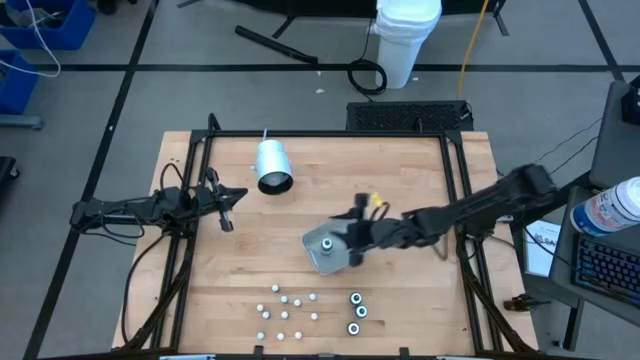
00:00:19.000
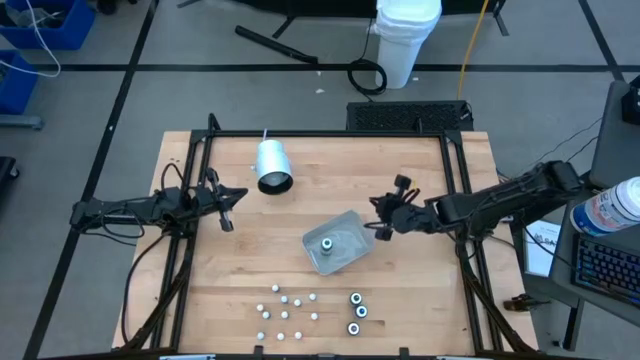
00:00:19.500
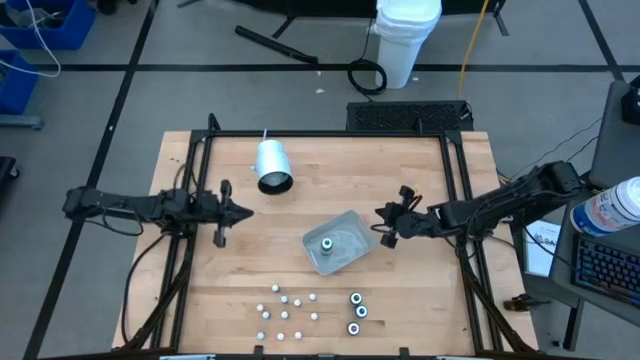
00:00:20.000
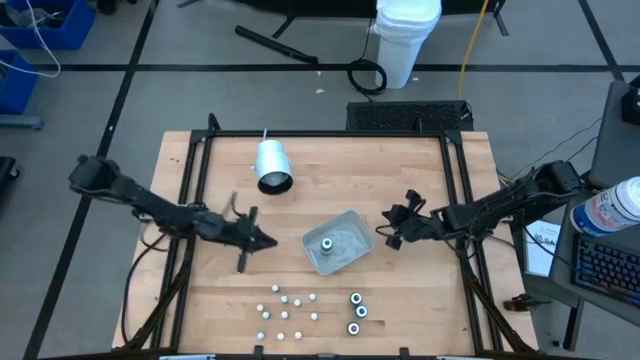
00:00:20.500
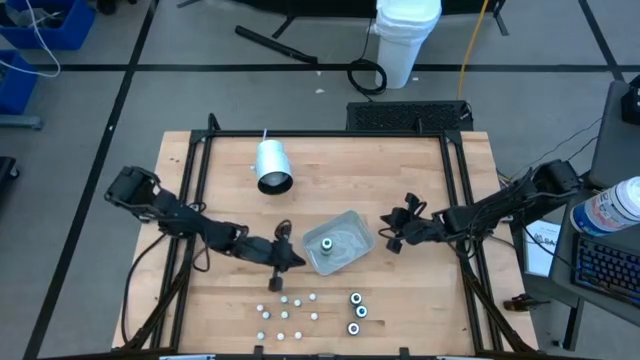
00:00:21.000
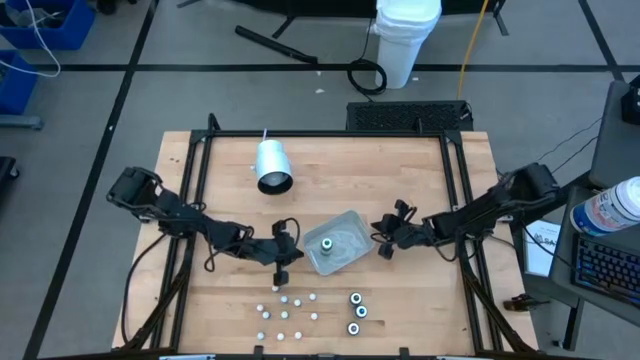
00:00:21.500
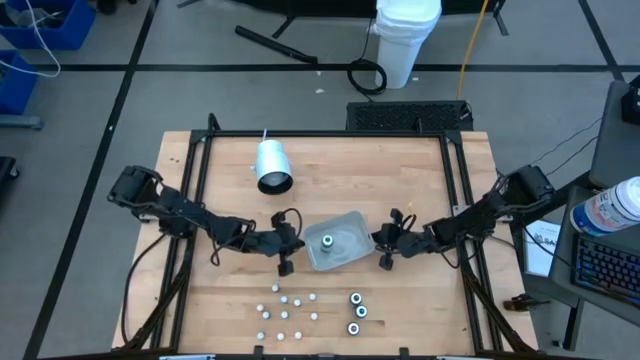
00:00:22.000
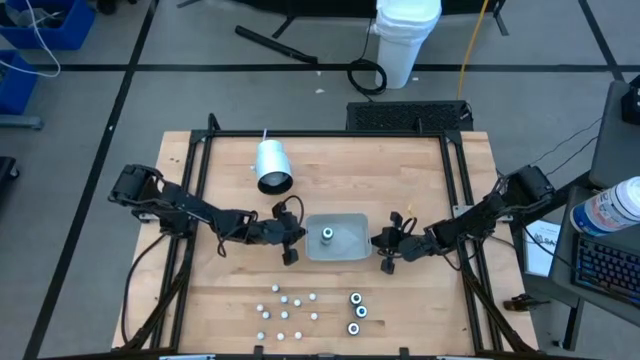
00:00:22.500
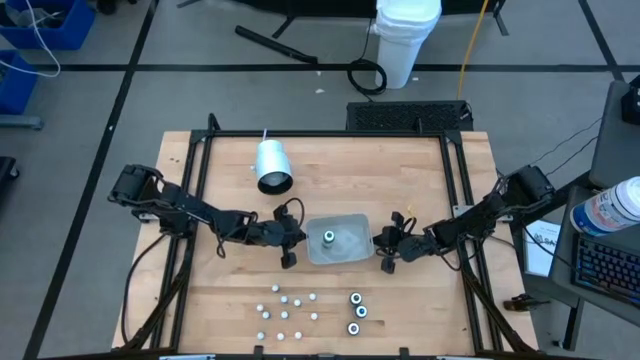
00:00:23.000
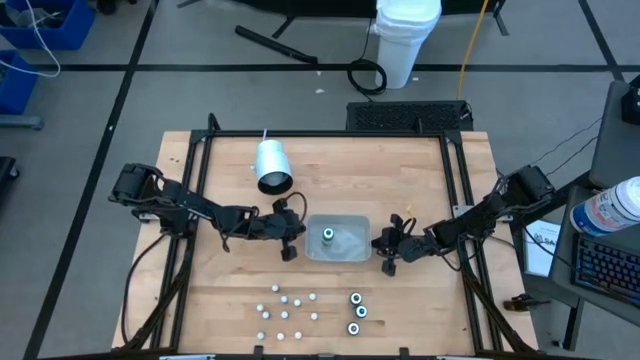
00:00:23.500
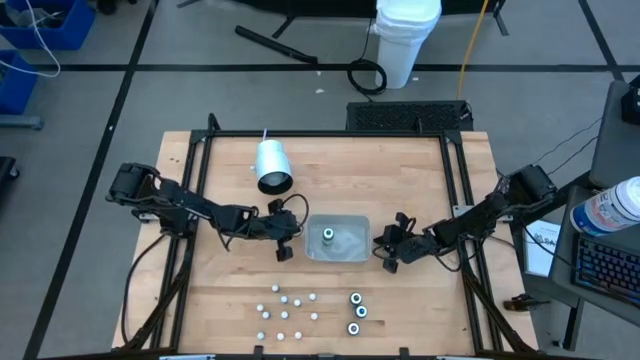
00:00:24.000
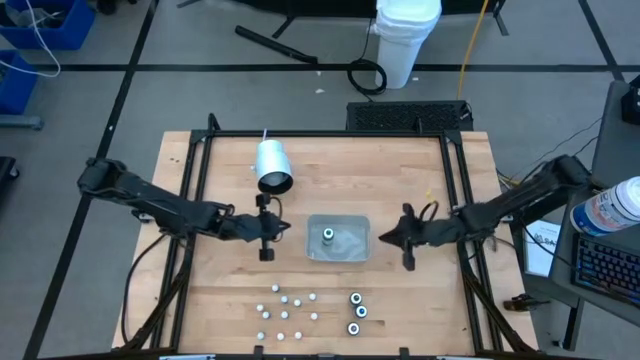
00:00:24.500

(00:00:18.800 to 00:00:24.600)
Task: Pick & Place food coloring
Adjust the white bin

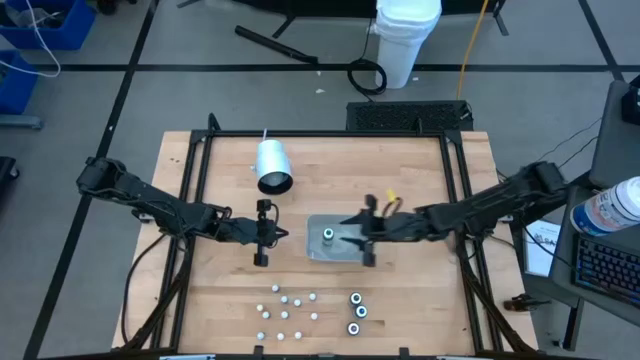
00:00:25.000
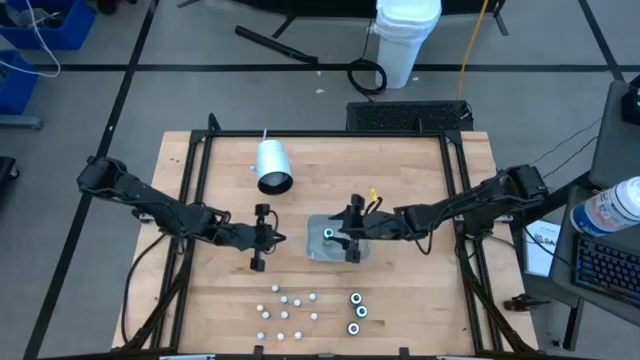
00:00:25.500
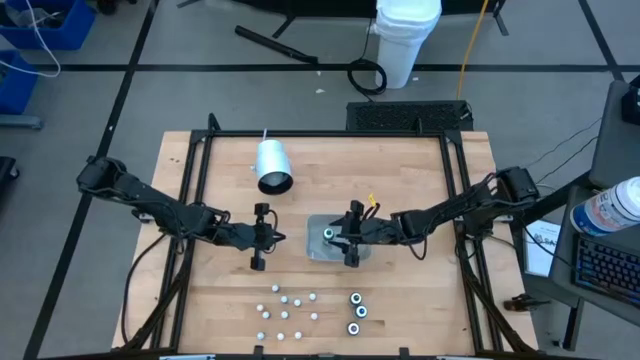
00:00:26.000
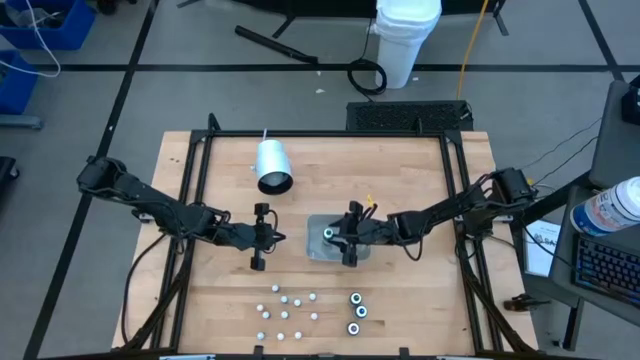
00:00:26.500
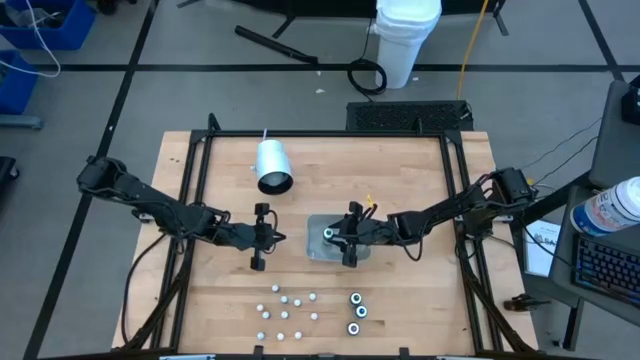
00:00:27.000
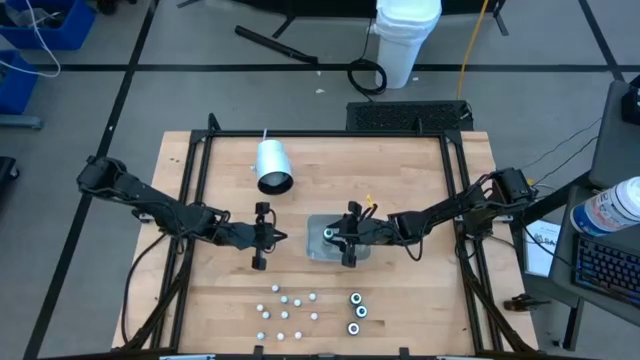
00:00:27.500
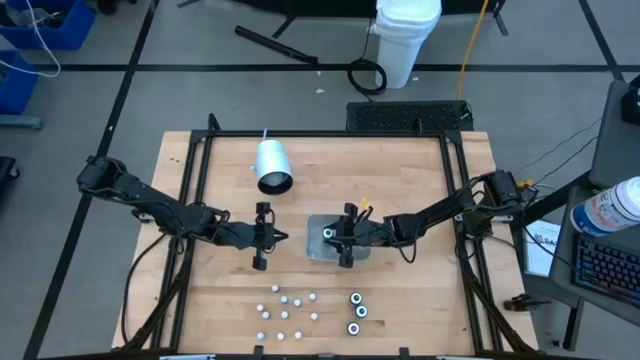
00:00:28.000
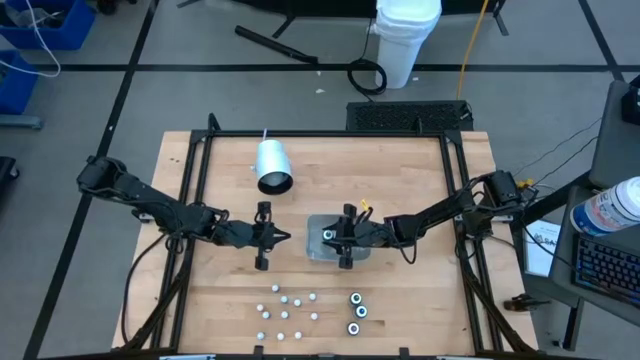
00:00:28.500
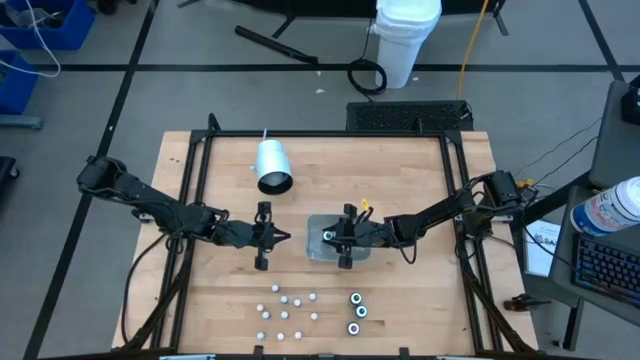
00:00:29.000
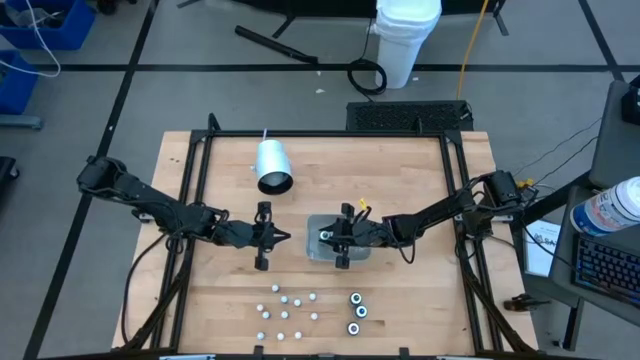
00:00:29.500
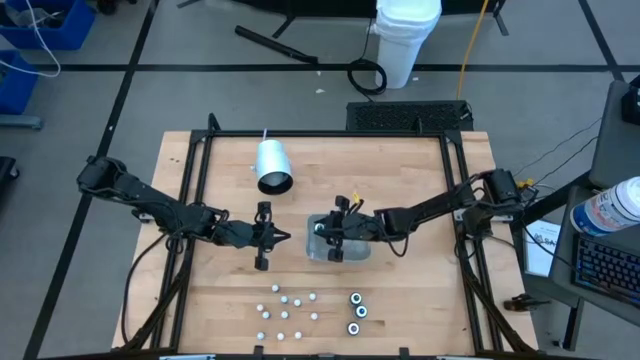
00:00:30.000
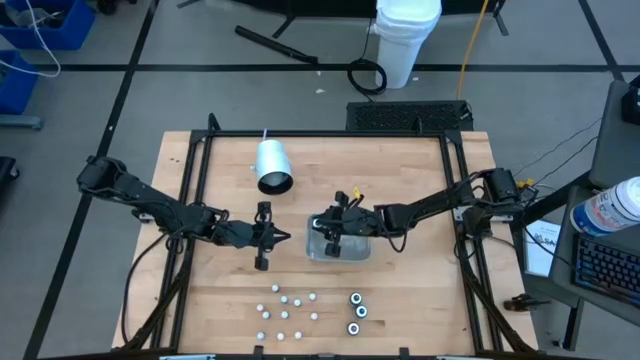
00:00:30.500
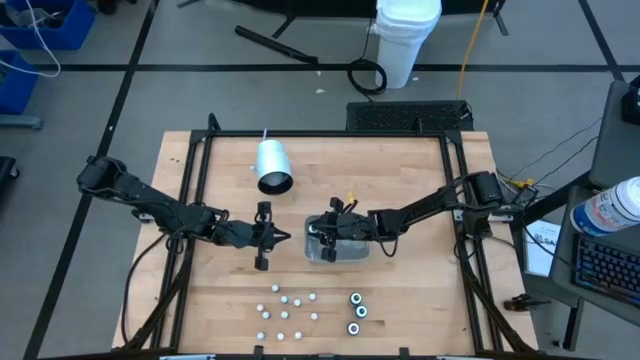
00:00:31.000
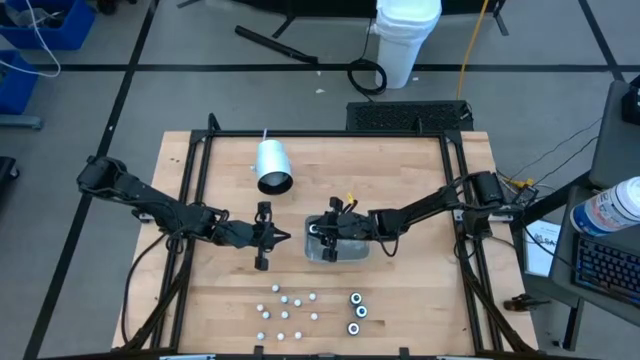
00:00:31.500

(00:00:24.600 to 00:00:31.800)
Adjust the large green food coloring bottle on the white bin

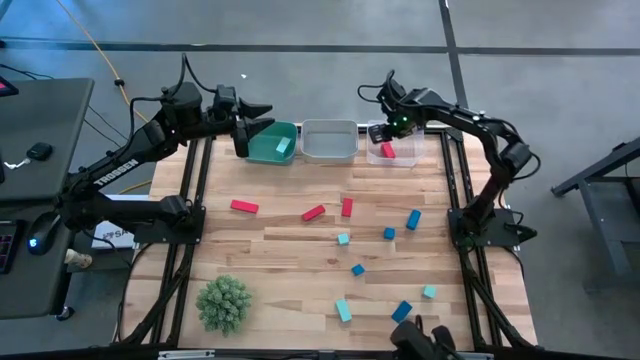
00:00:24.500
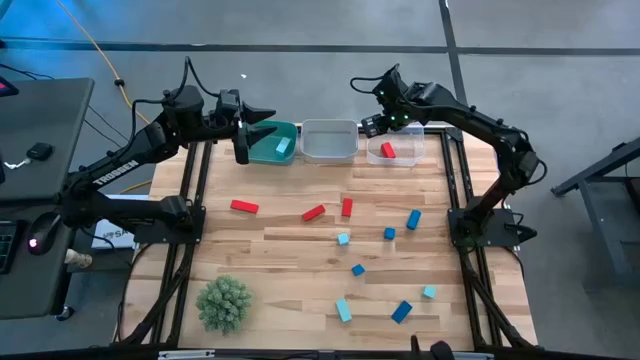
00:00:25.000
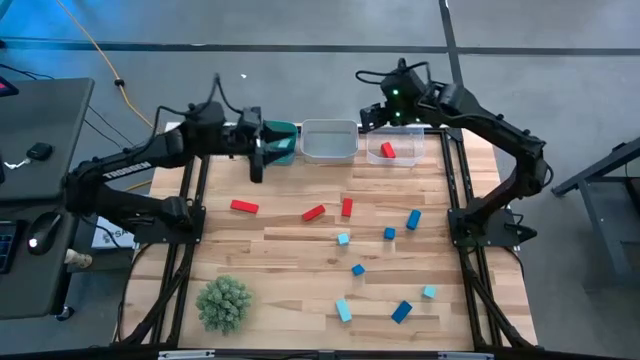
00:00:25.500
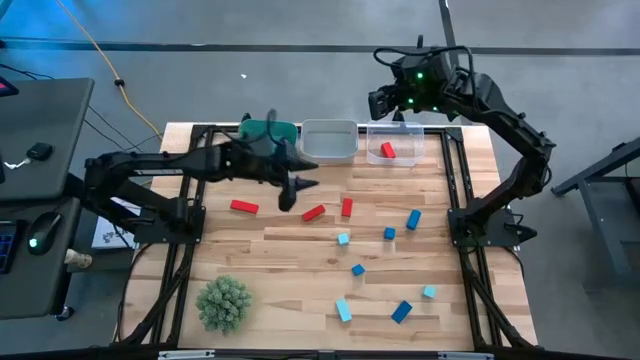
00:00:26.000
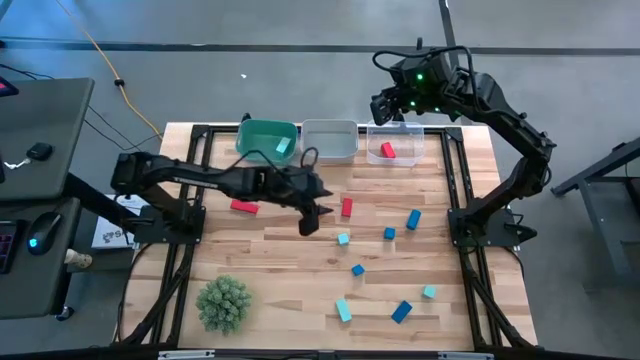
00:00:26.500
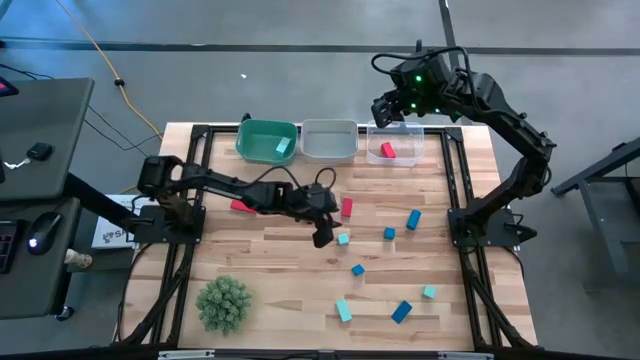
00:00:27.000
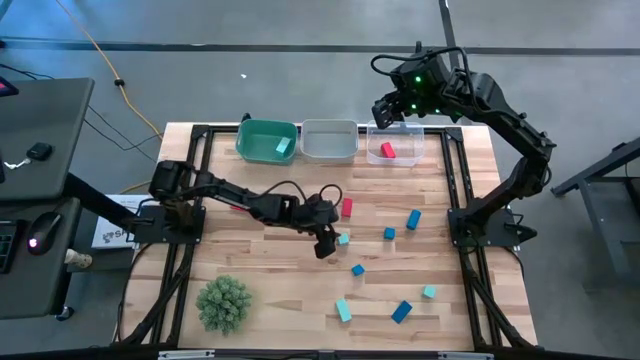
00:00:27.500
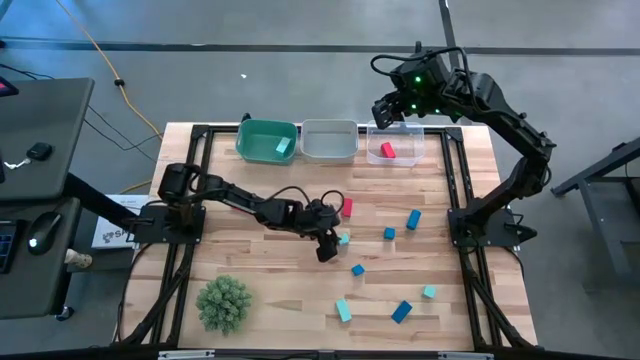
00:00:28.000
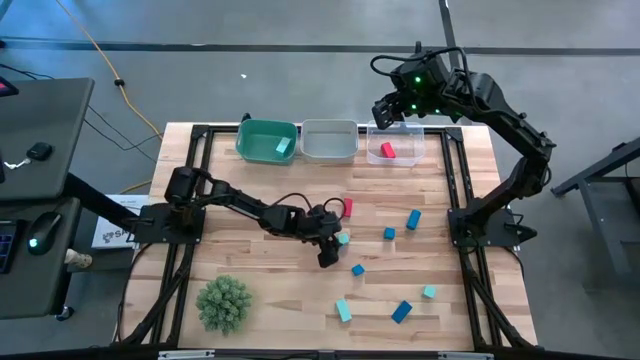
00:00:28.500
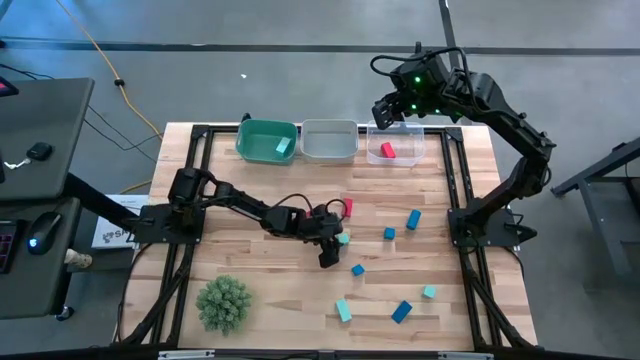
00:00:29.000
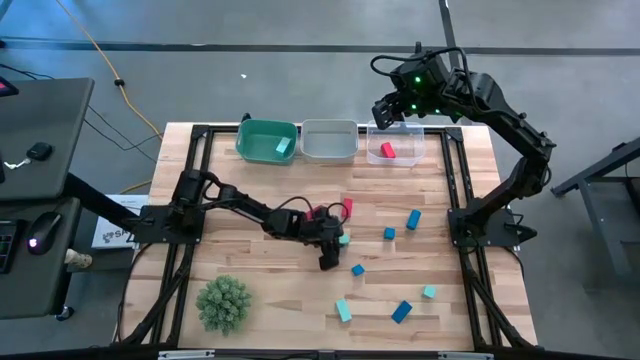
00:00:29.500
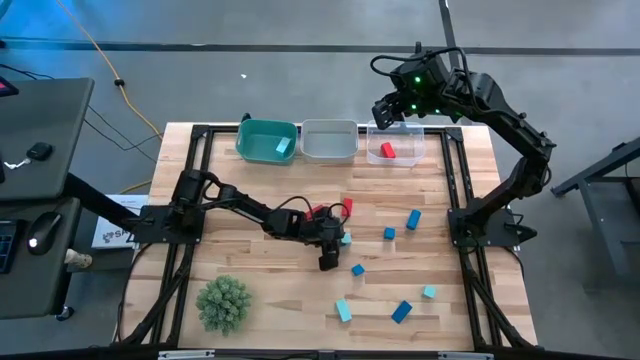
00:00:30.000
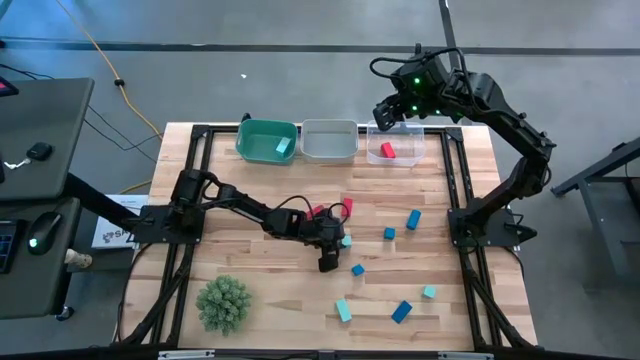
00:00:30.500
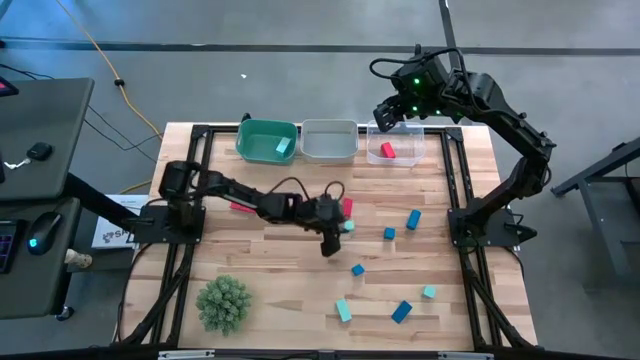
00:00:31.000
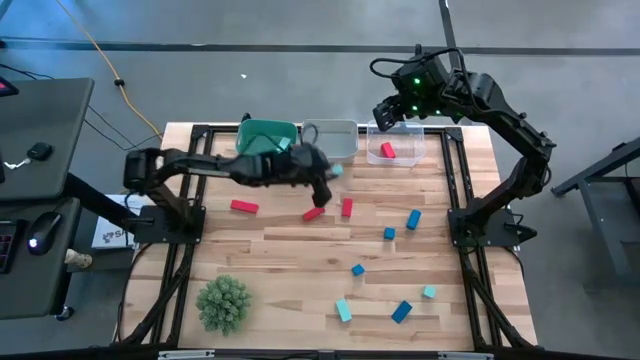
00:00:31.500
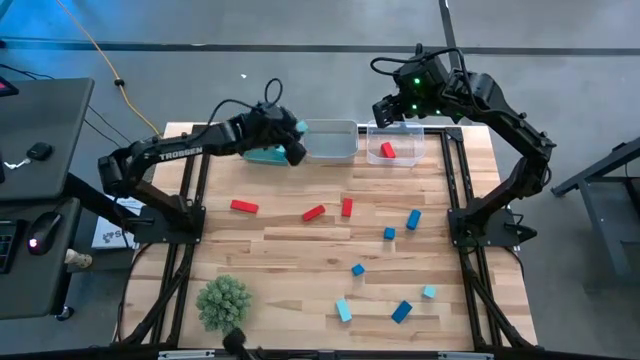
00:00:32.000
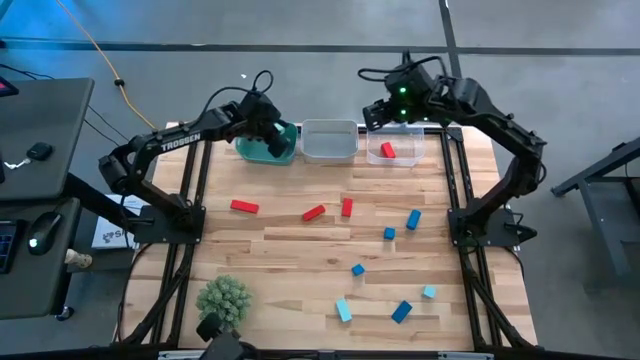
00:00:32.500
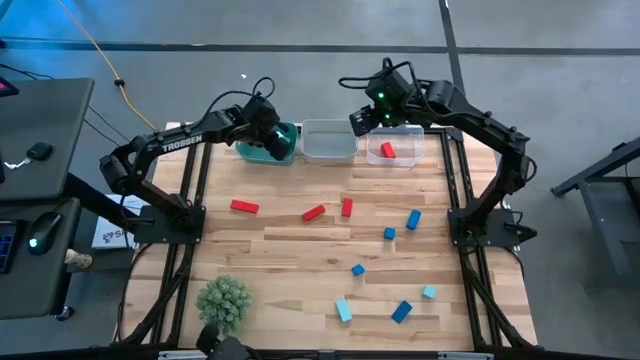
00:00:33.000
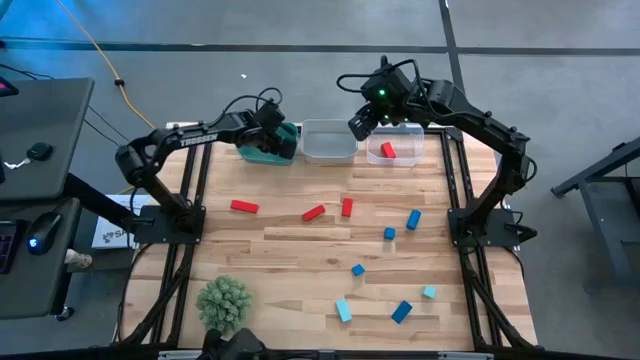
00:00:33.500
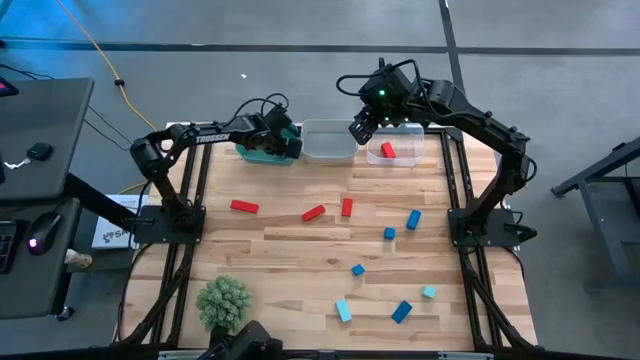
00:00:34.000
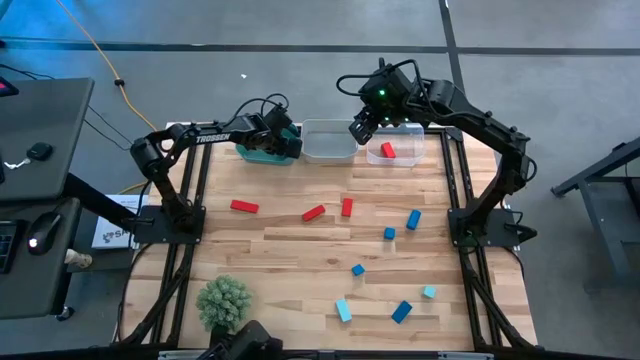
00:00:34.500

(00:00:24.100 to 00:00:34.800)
Task: Sort & place blocks by color
Put the top light blue block into the green bin
